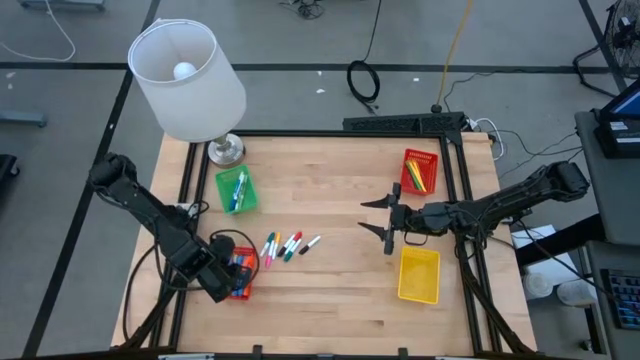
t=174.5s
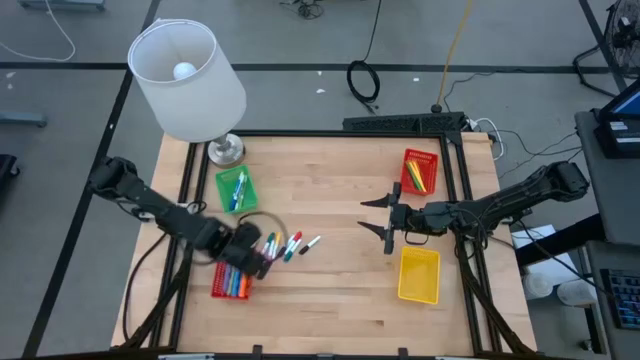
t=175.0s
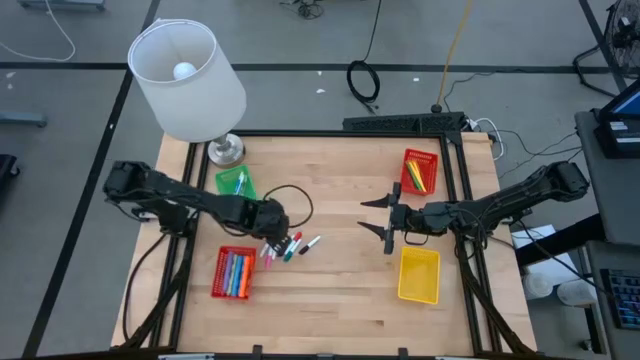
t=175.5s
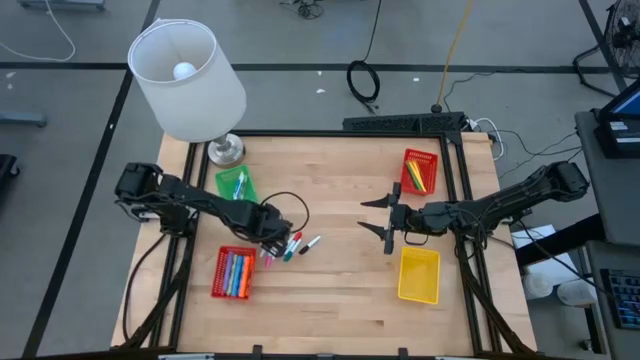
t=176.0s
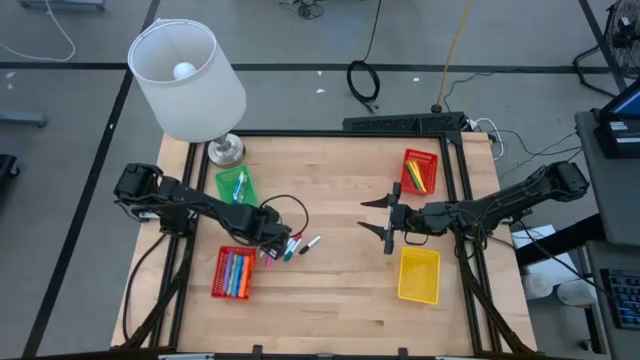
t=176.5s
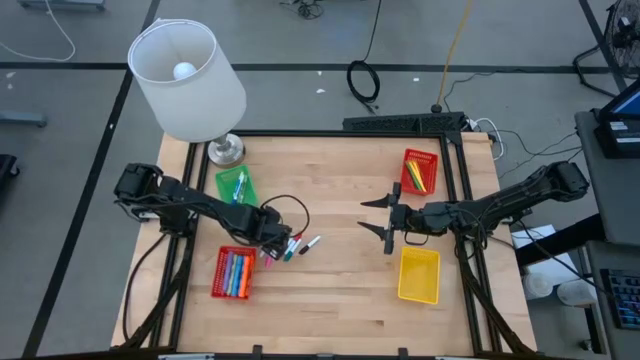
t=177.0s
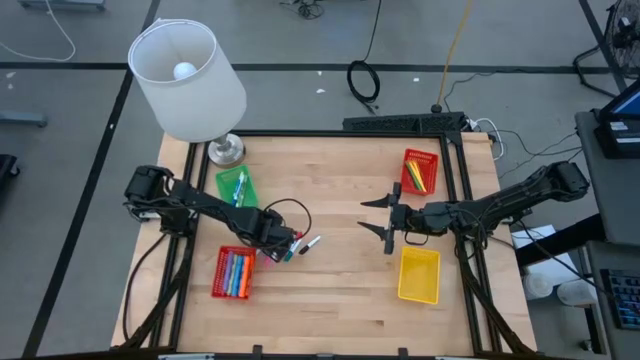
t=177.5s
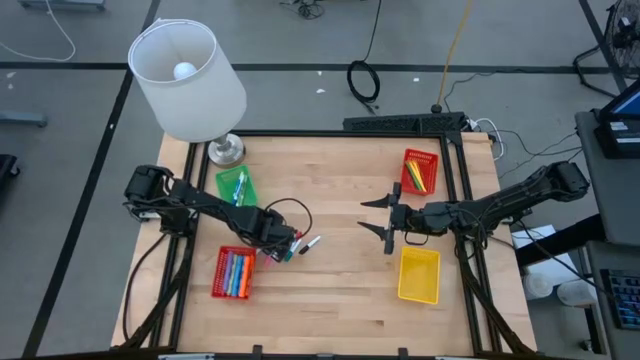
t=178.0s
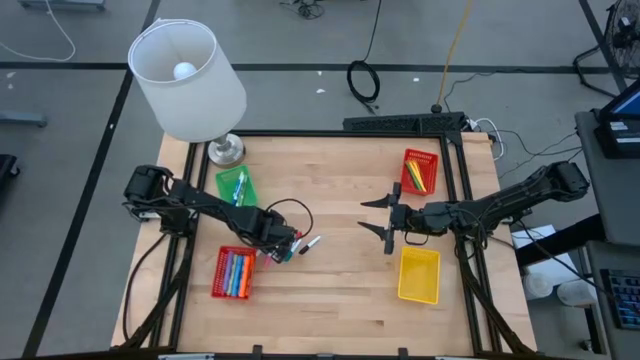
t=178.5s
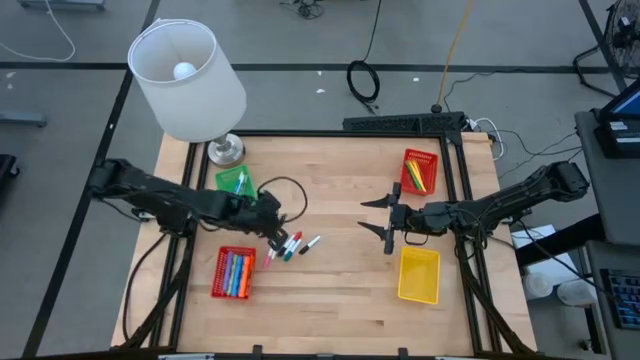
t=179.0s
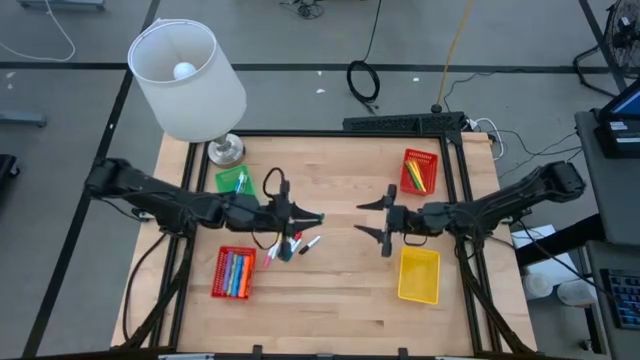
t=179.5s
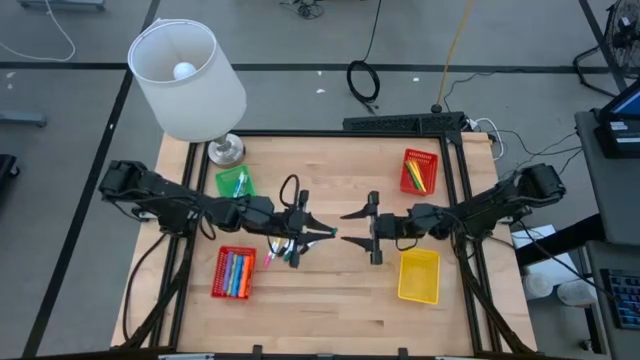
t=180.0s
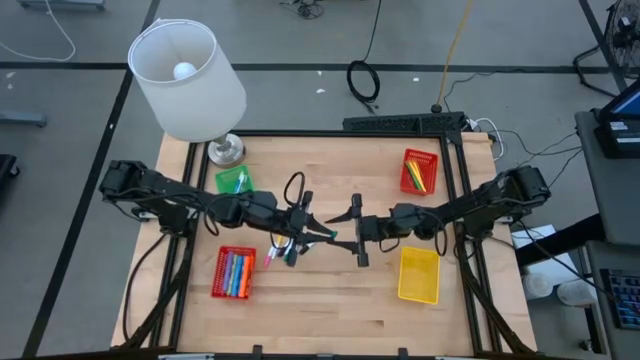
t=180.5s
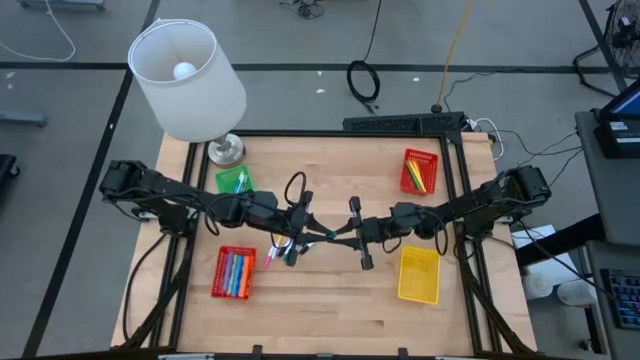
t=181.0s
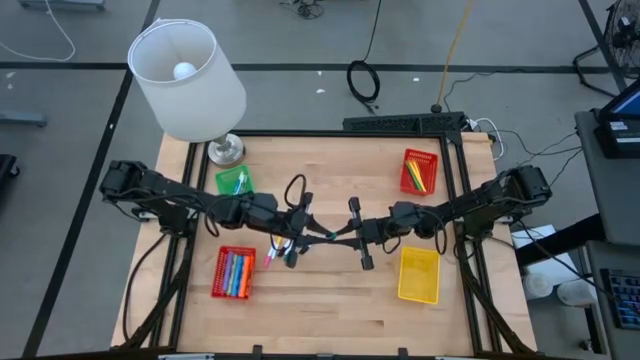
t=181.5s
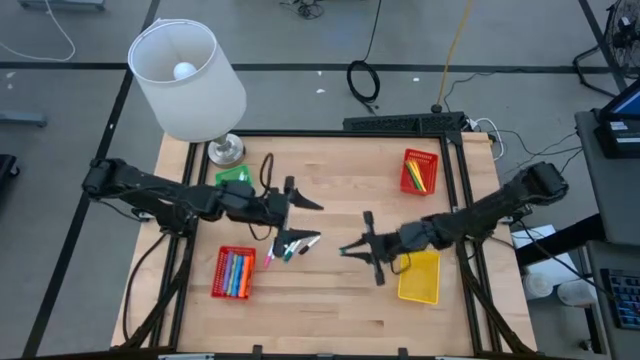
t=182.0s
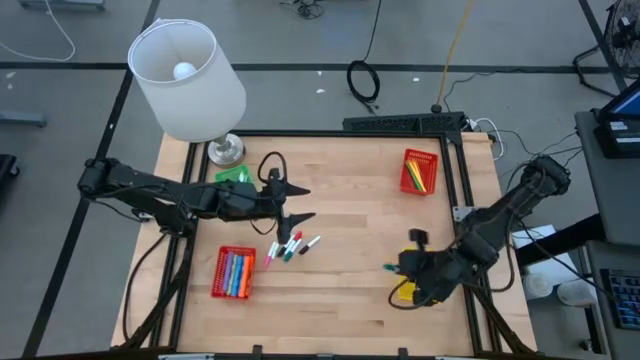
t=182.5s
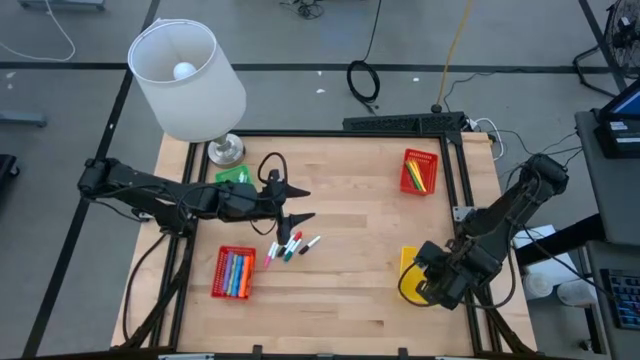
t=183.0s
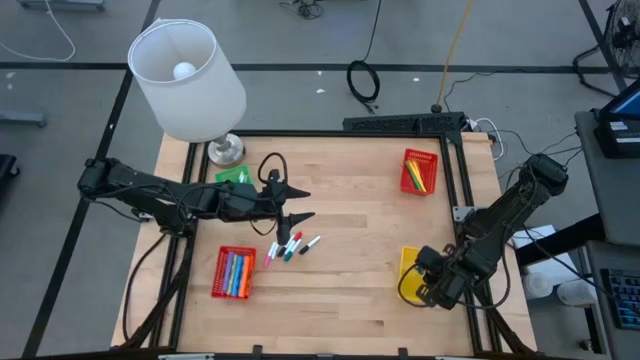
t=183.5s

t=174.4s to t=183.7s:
Task: Pick & Place Markers
Put the left green highlighter pen into the yellow basket

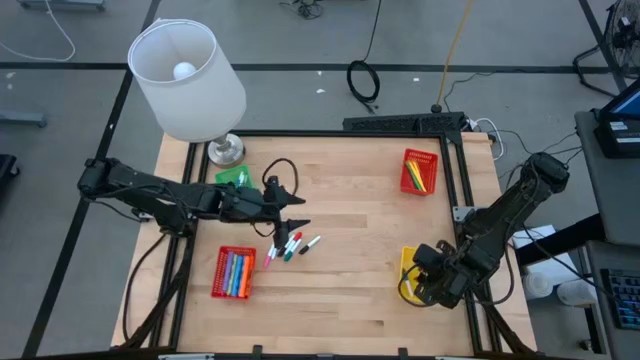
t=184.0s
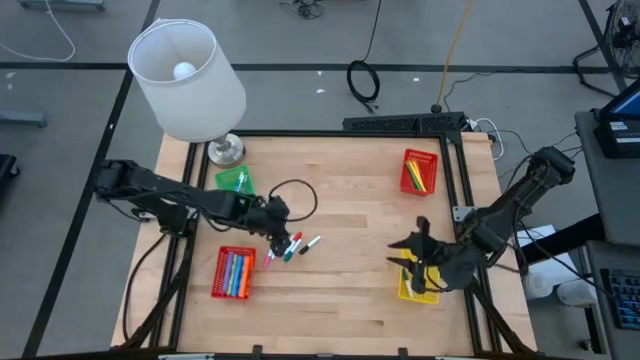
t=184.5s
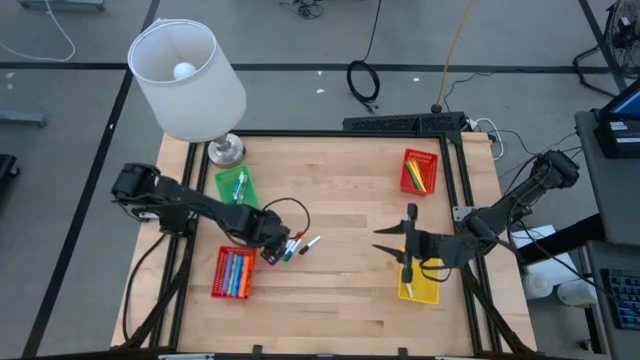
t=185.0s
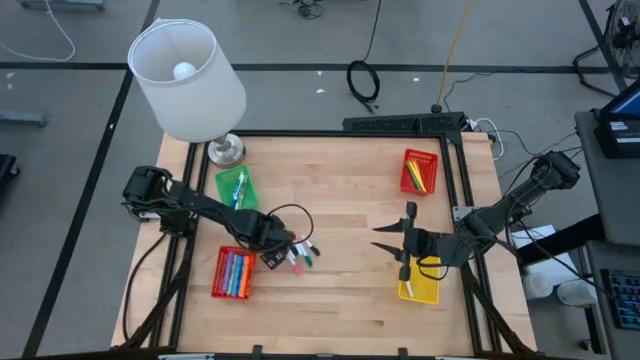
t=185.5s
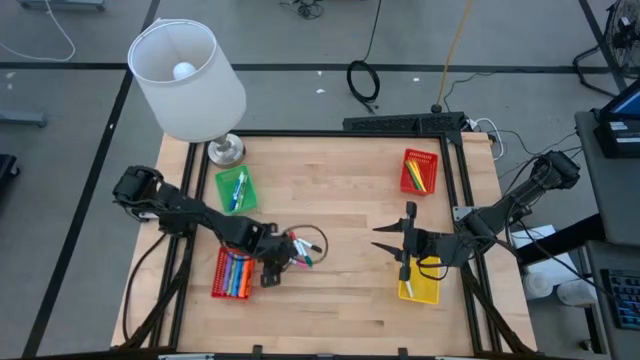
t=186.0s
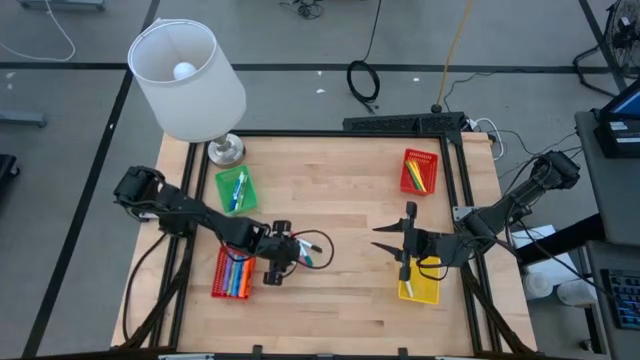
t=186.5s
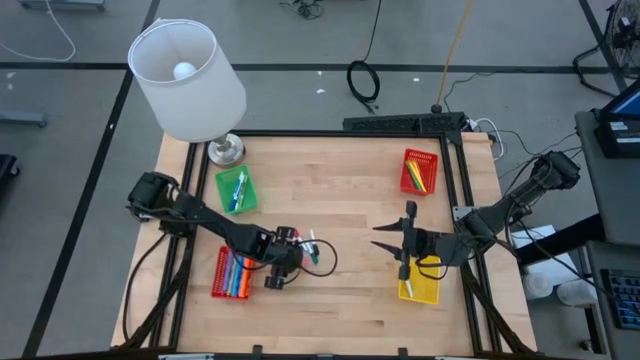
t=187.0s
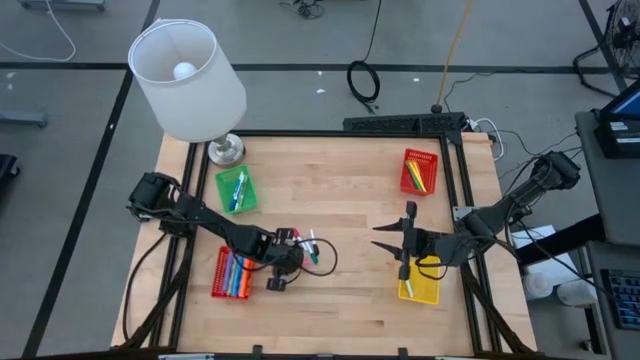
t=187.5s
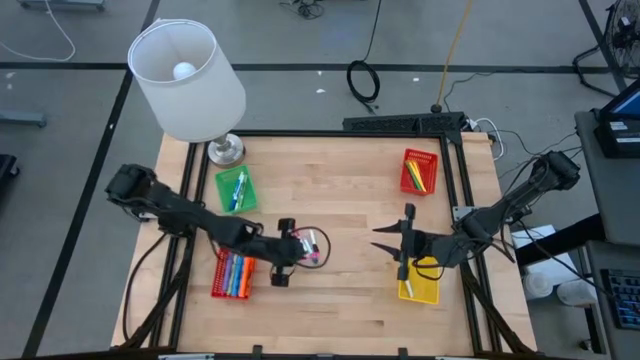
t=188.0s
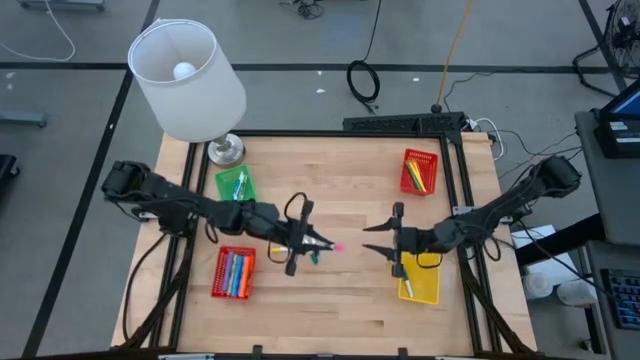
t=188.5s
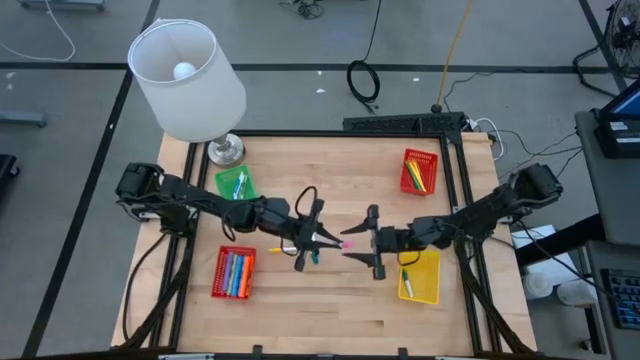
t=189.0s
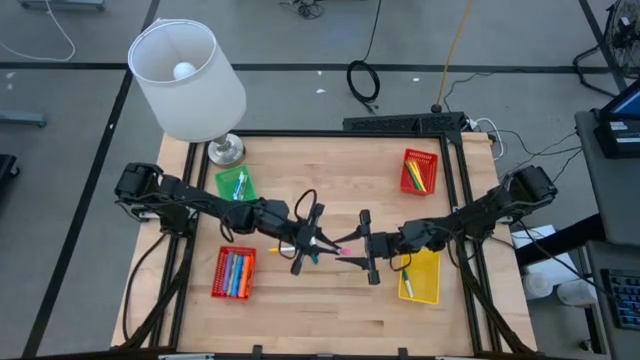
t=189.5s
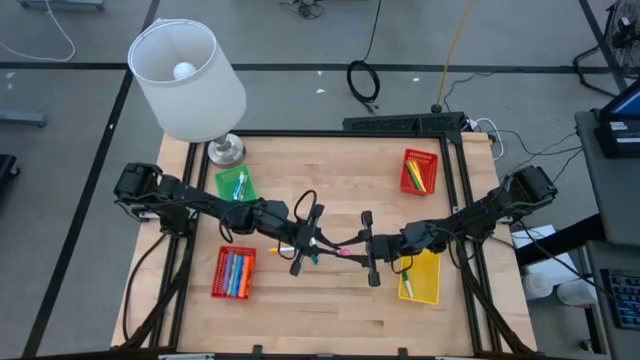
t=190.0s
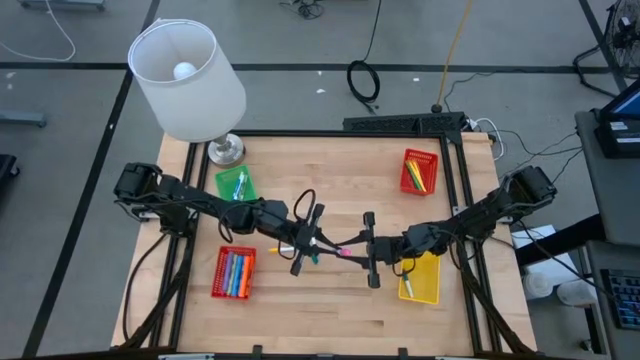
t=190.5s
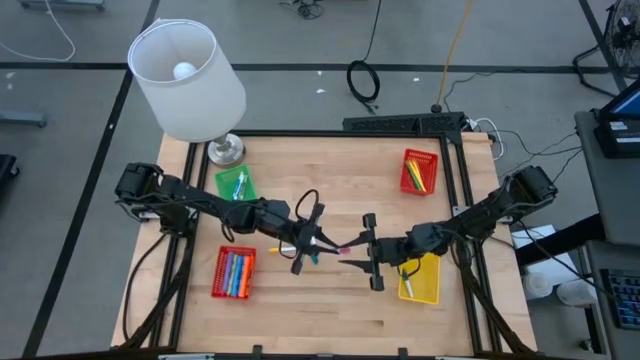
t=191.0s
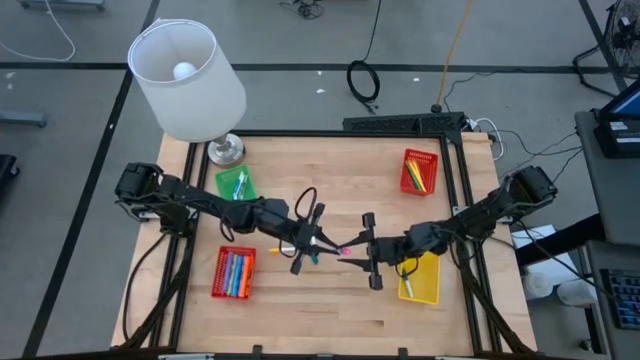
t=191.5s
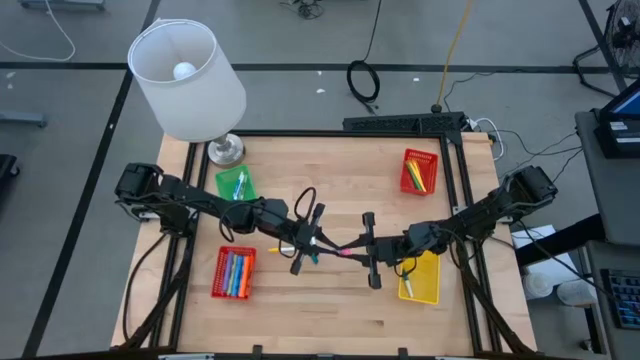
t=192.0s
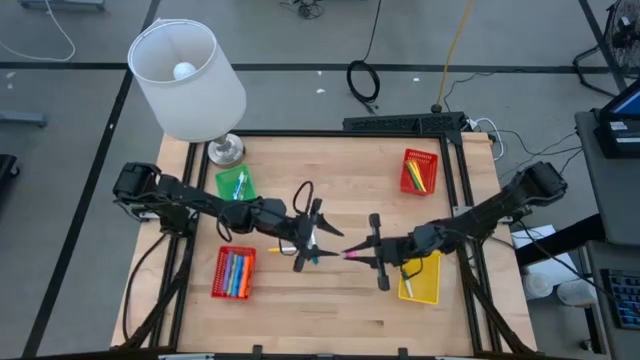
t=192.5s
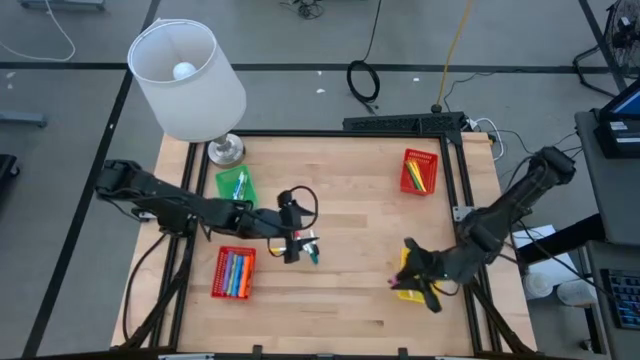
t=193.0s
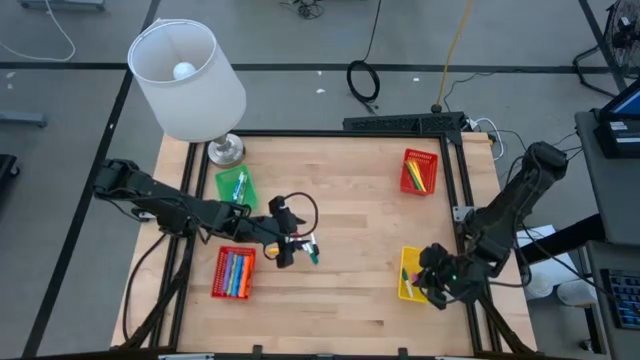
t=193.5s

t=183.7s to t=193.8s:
Put the pink highlighter pen into the yellow basket

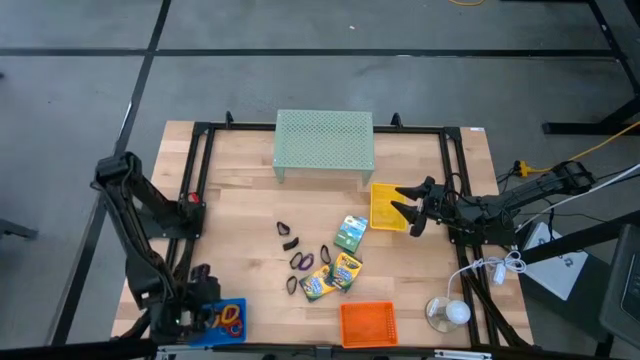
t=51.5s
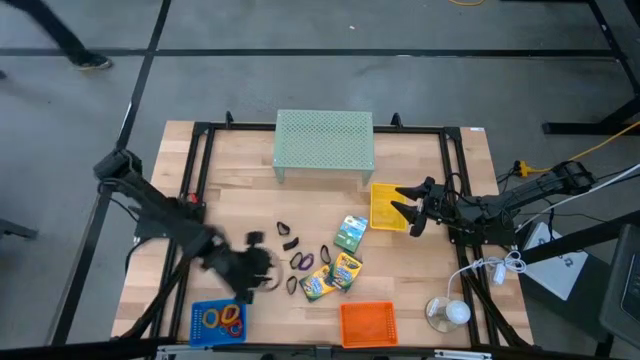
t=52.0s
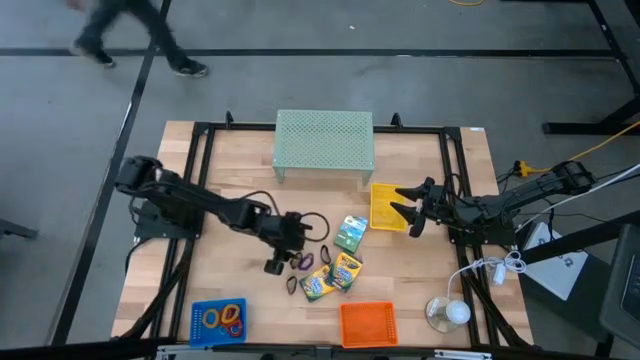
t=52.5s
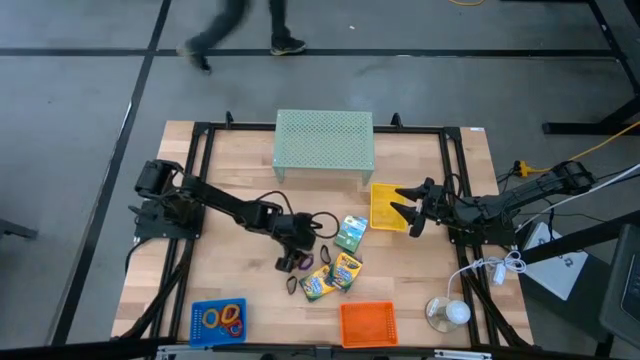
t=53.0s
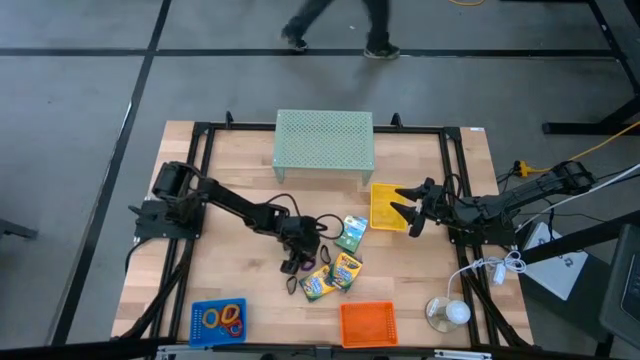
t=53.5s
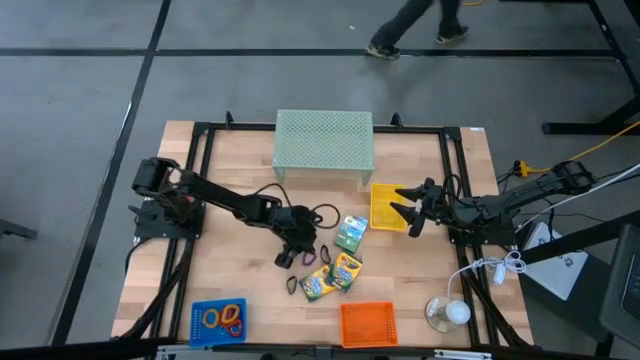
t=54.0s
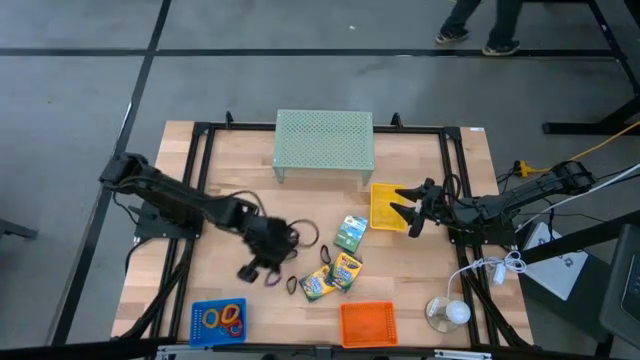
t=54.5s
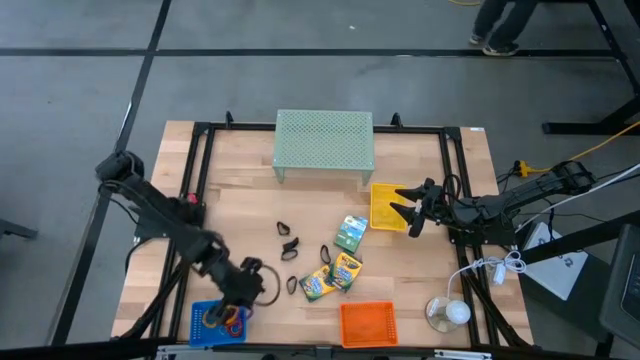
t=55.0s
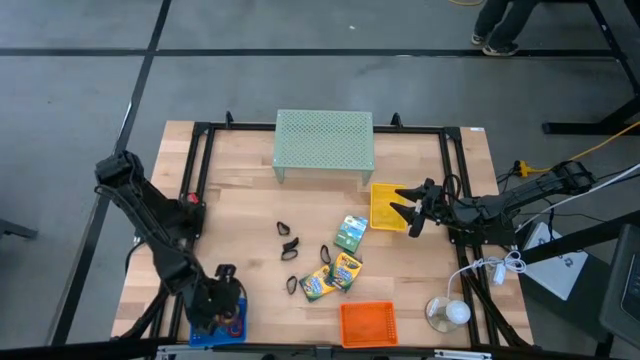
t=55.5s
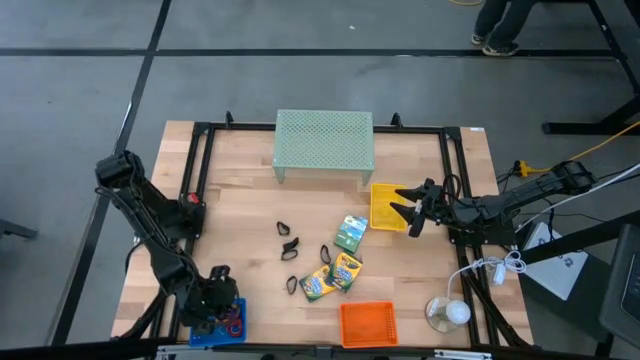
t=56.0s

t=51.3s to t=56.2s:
Task: Pick & Place Office Desk Supplies
Put the violet spring keychain into the blue bin
